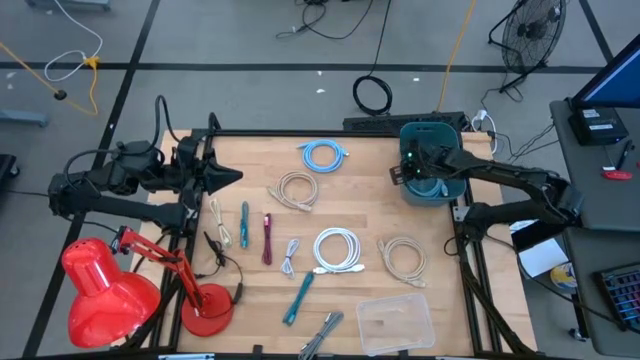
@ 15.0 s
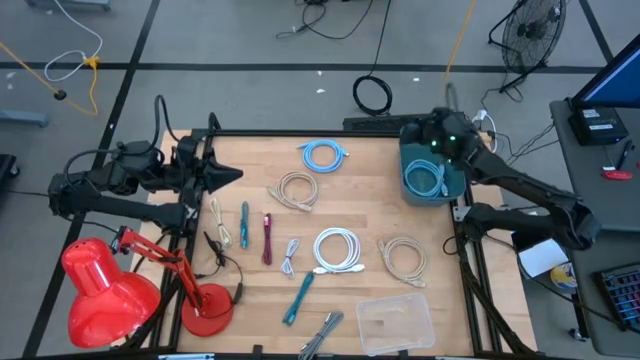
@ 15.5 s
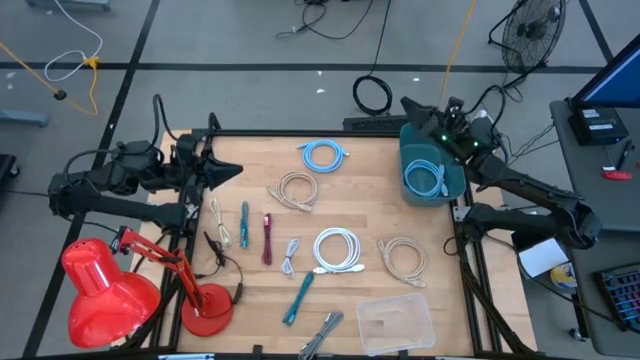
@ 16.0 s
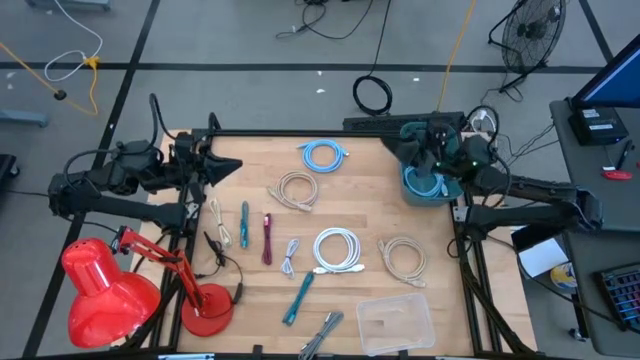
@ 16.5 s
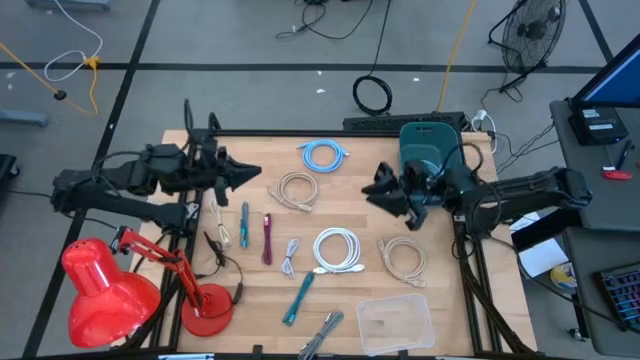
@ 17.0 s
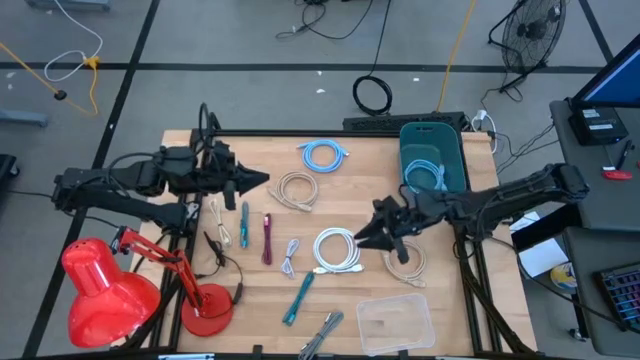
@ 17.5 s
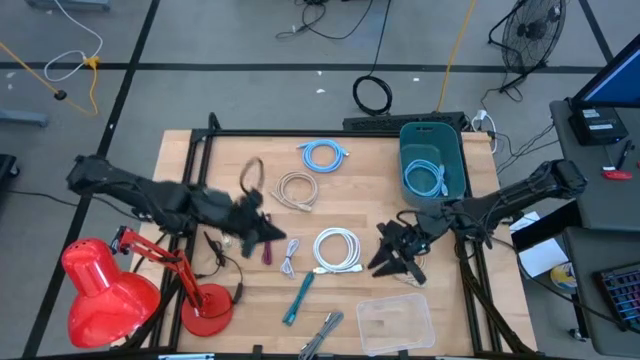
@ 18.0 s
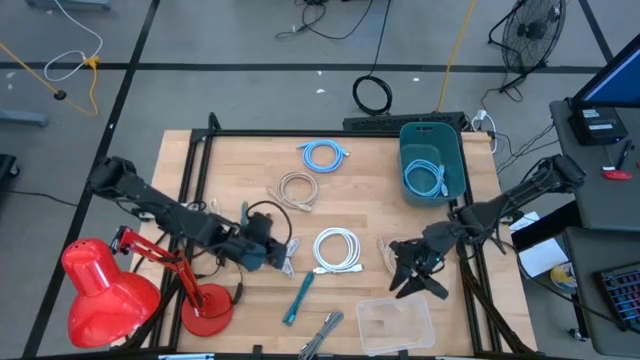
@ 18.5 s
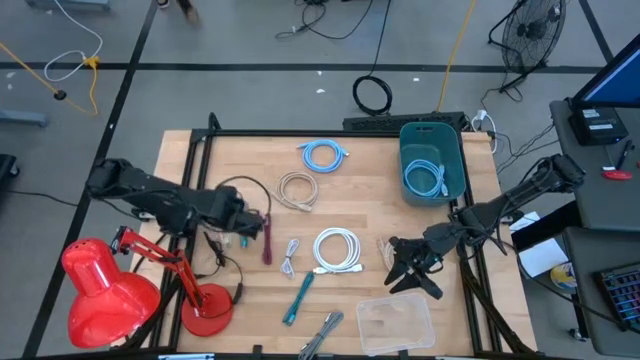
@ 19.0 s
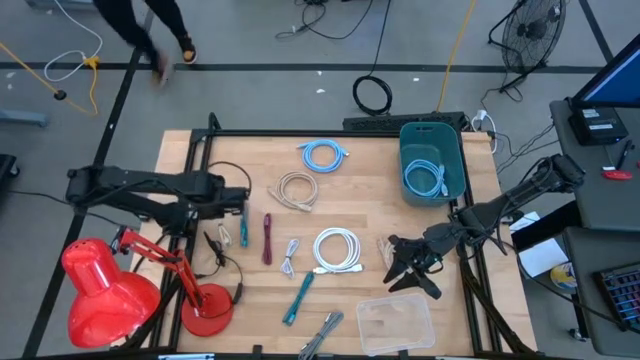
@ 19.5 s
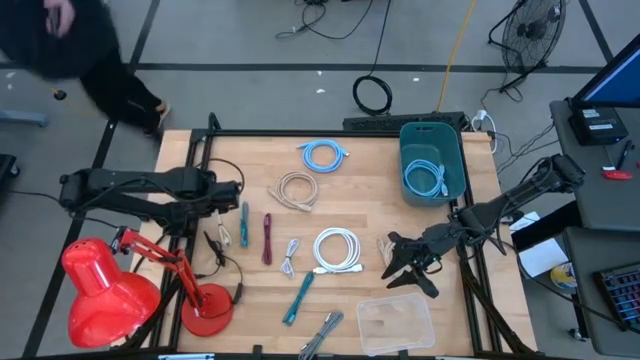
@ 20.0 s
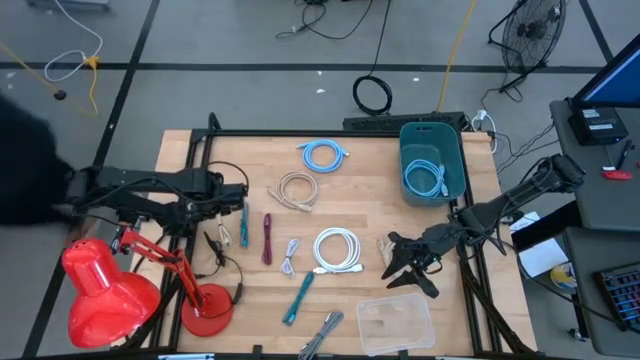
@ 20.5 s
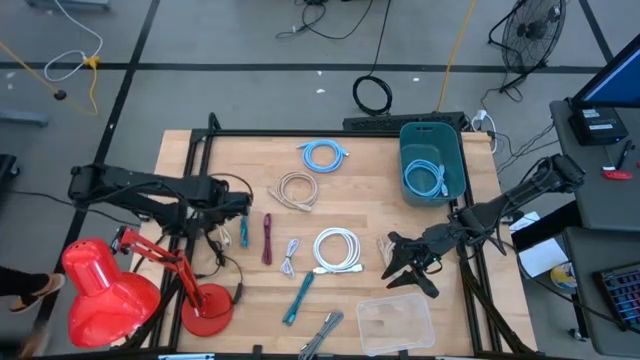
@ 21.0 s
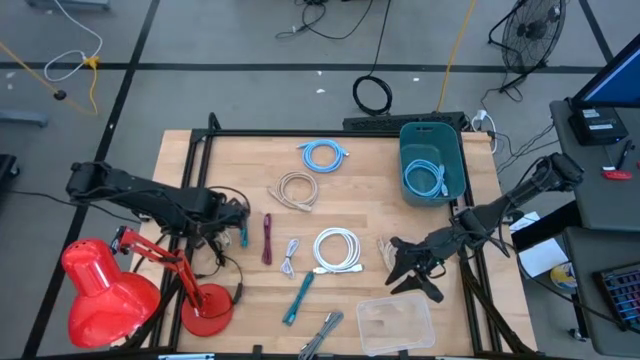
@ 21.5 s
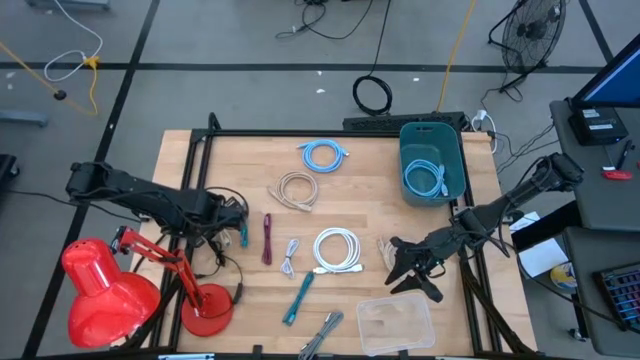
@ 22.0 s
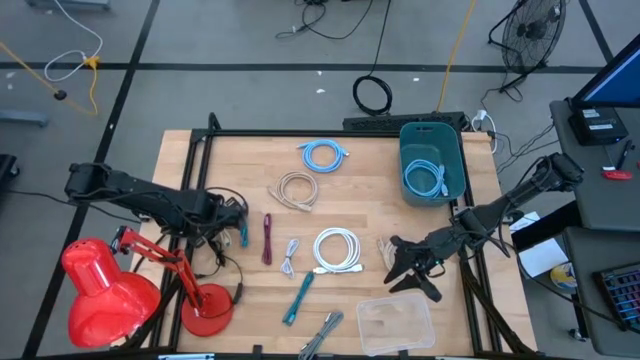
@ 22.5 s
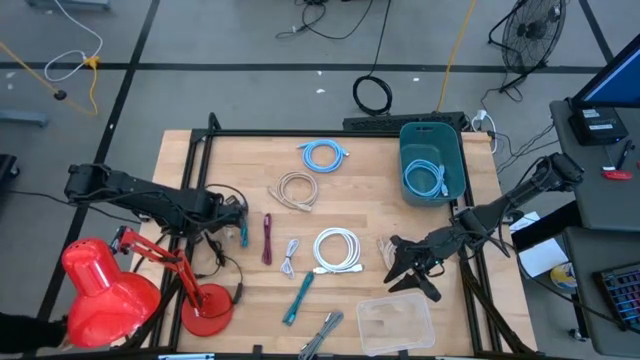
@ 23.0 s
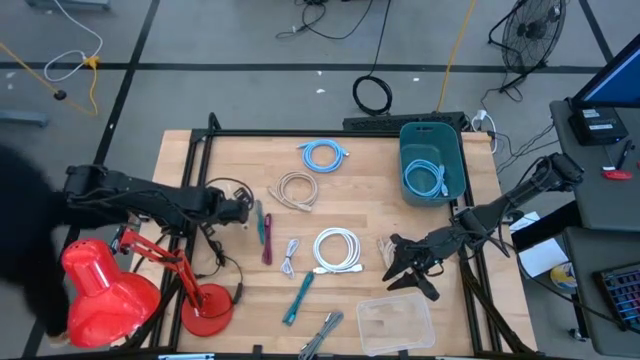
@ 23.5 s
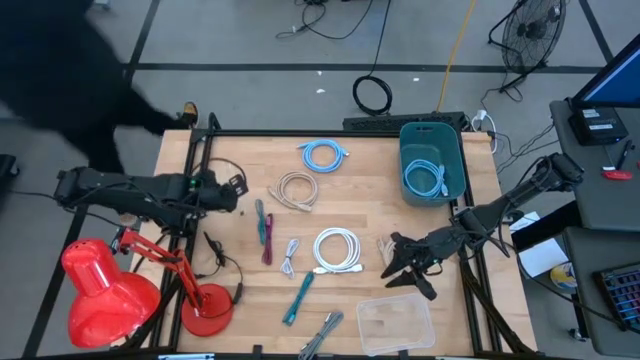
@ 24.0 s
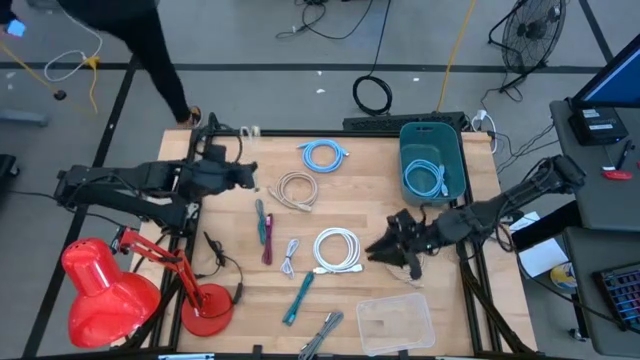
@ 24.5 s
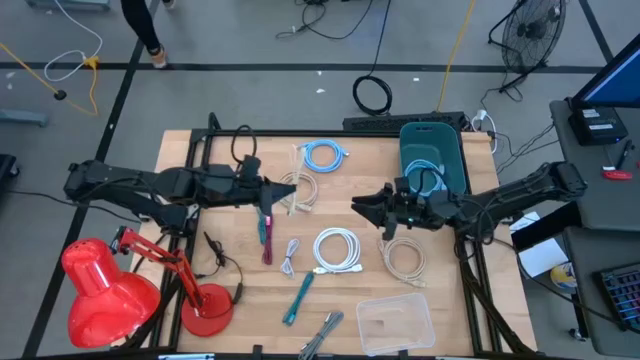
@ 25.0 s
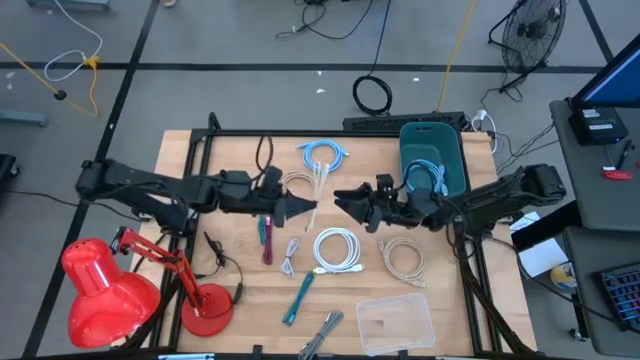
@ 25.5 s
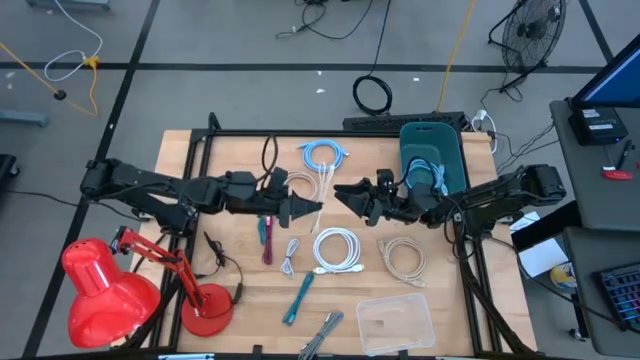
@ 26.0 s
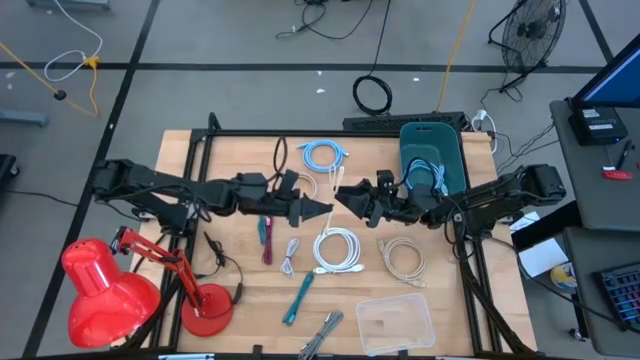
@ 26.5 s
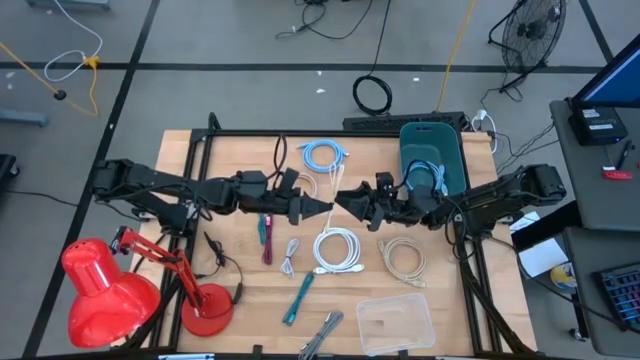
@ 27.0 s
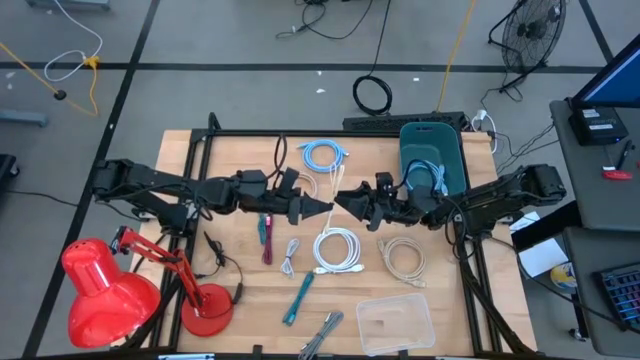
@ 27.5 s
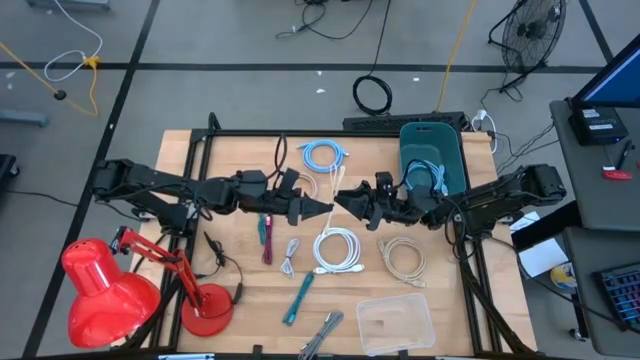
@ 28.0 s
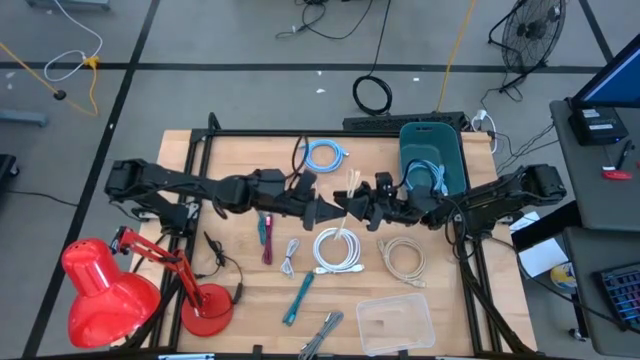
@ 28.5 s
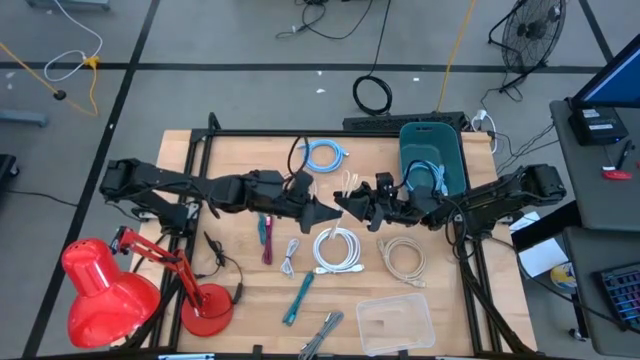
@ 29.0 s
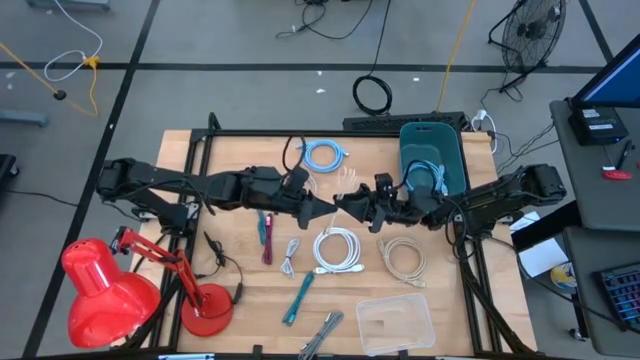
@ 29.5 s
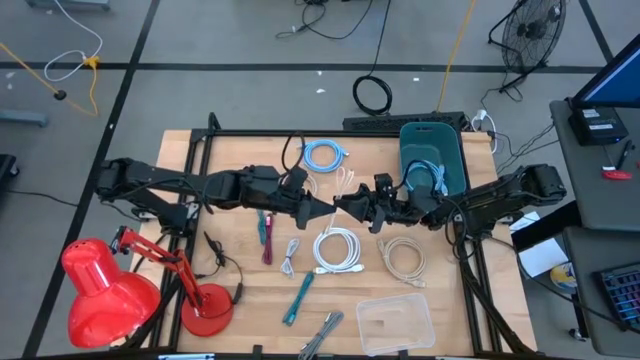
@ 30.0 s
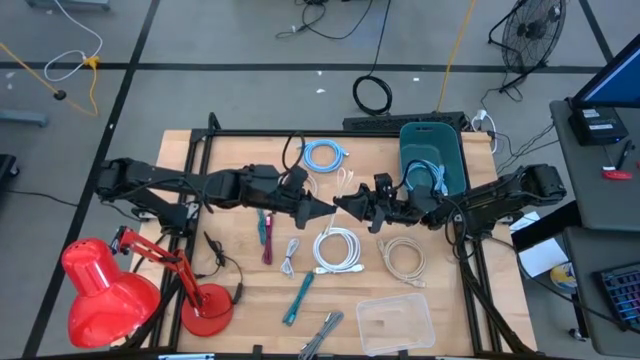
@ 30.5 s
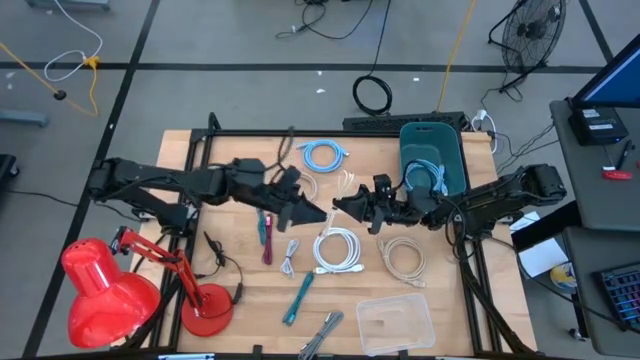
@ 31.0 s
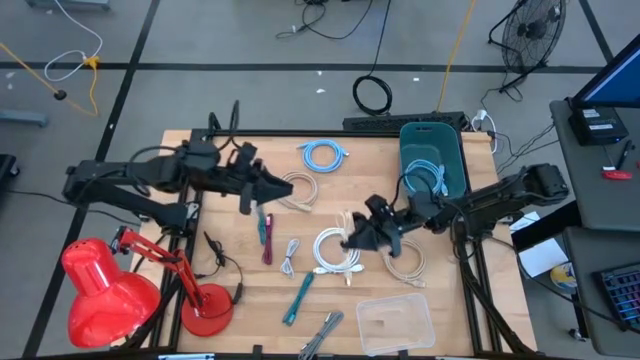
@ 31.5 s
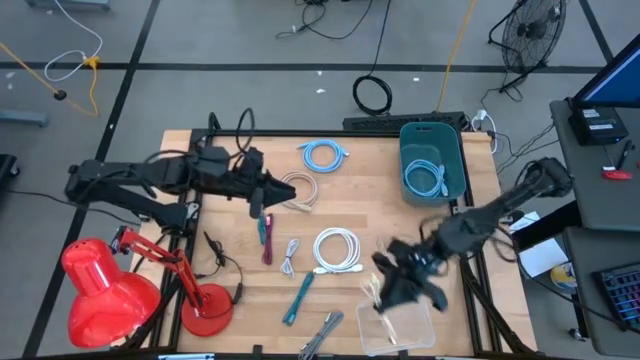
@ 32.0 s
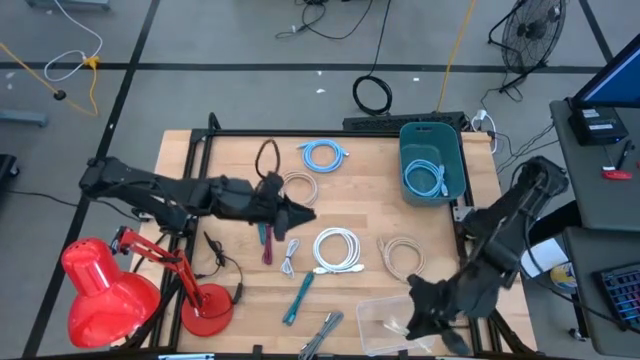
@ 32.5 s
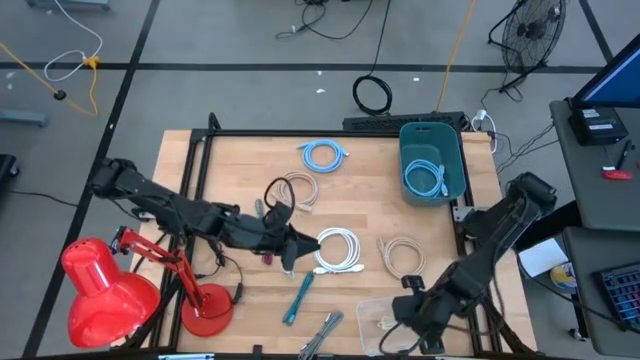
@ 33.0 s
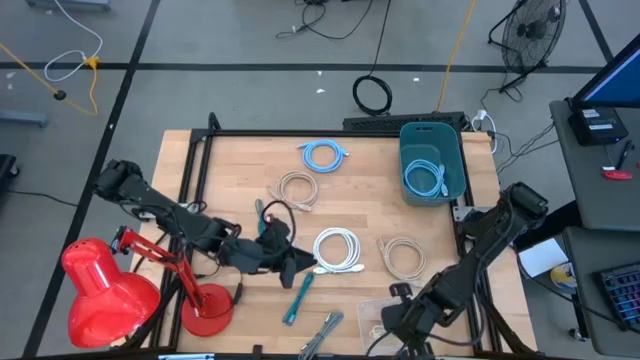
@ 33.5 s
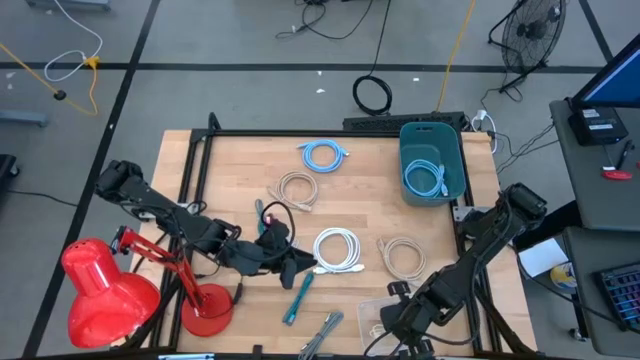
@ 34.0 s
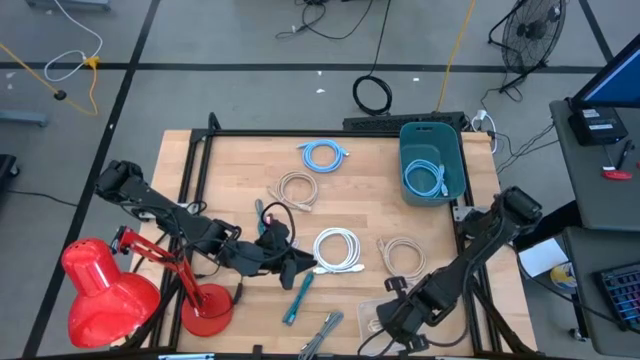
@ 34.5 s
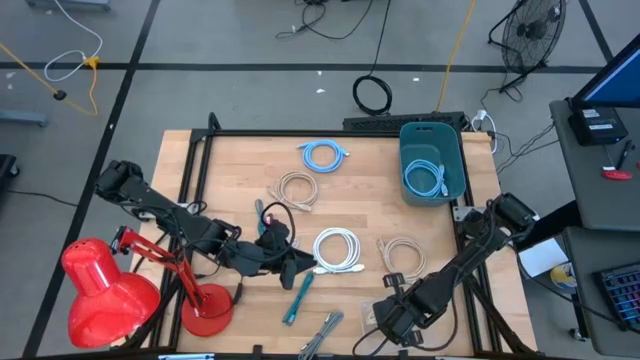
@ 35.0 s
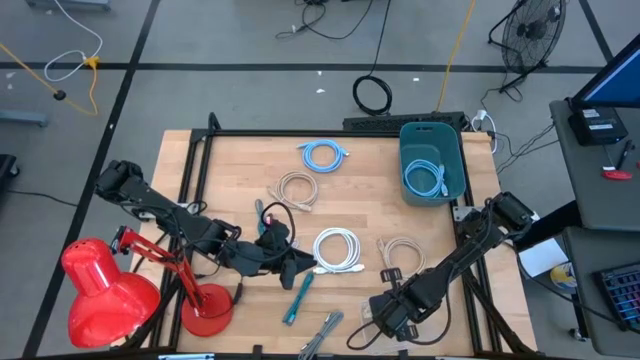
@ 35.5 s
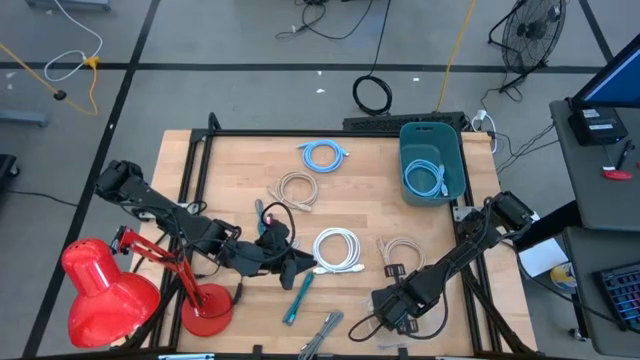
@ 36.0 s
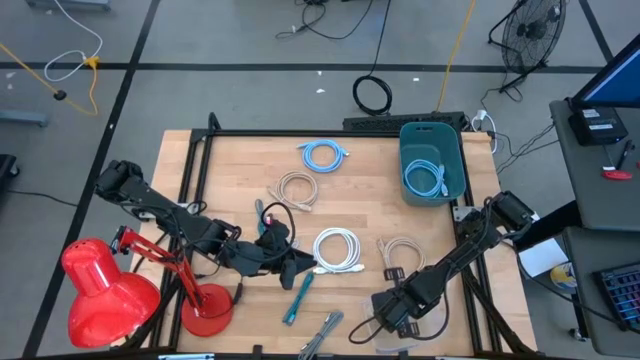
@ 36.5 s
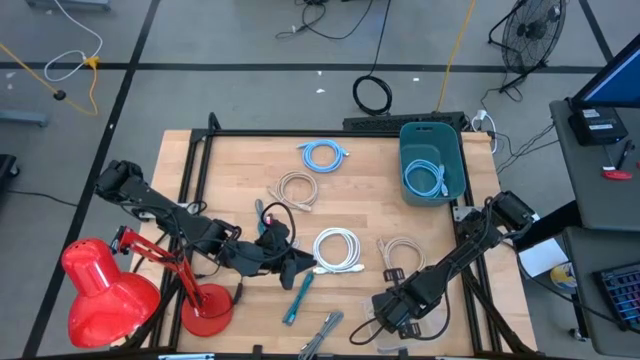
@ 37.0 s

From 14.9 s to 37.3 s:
Task: Pick & Place USB Port
Put the light brown charger cable into the transparent bin
